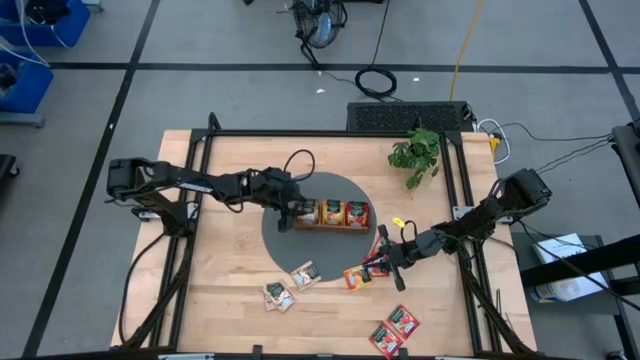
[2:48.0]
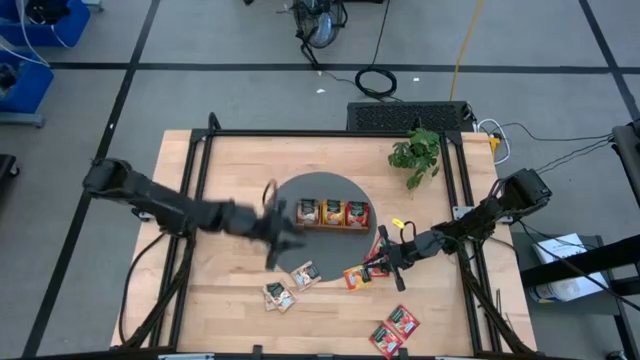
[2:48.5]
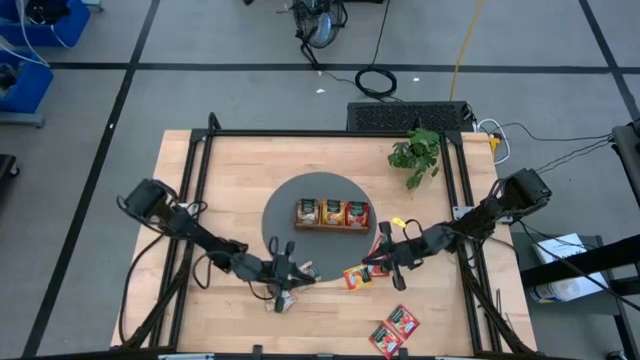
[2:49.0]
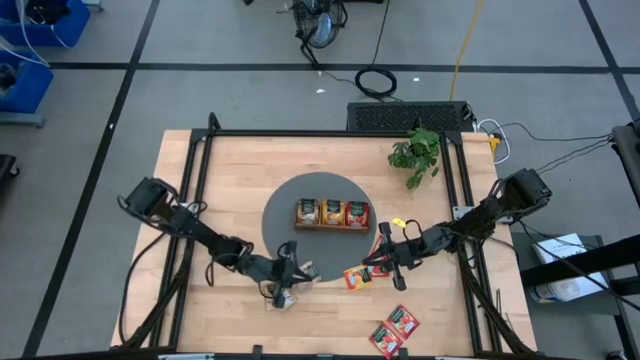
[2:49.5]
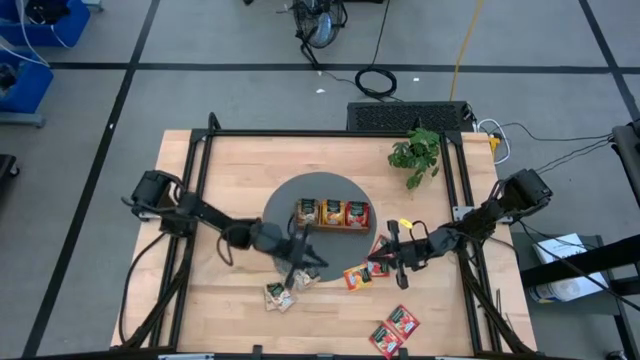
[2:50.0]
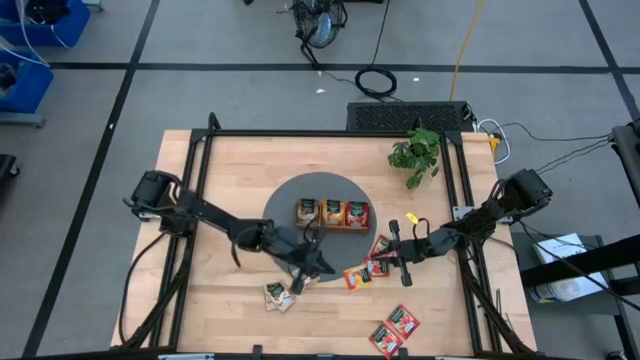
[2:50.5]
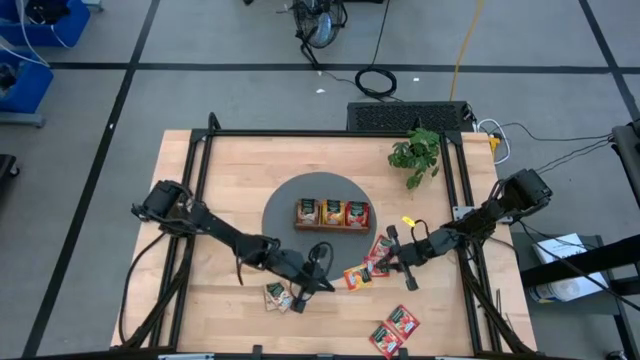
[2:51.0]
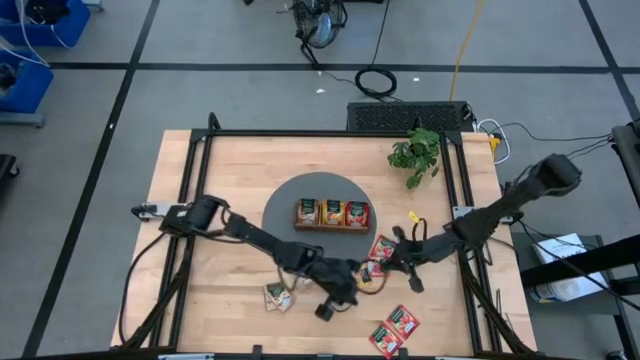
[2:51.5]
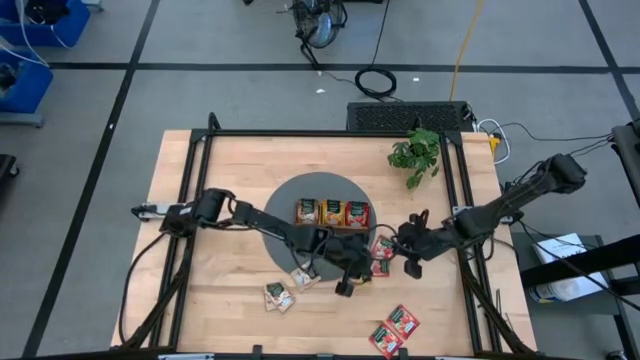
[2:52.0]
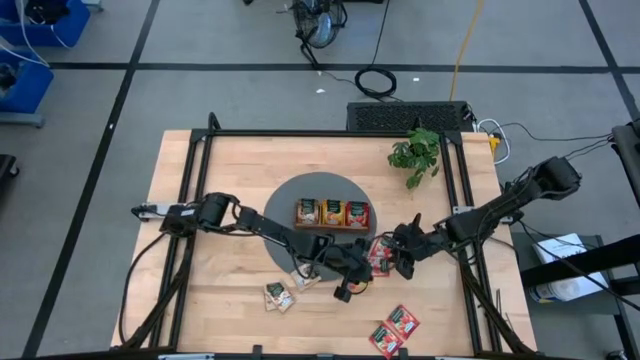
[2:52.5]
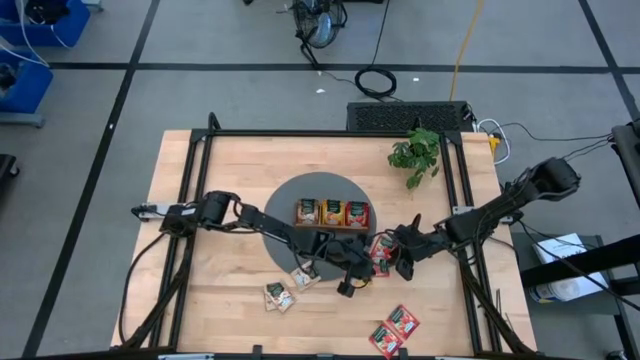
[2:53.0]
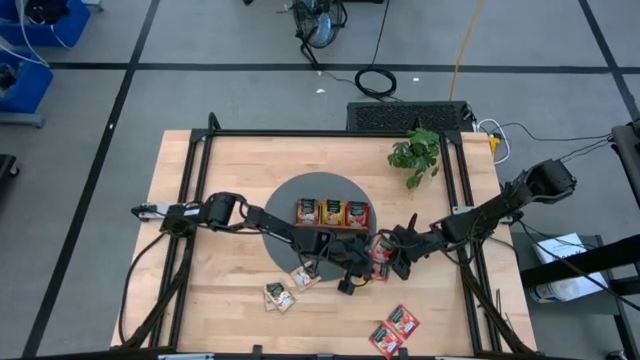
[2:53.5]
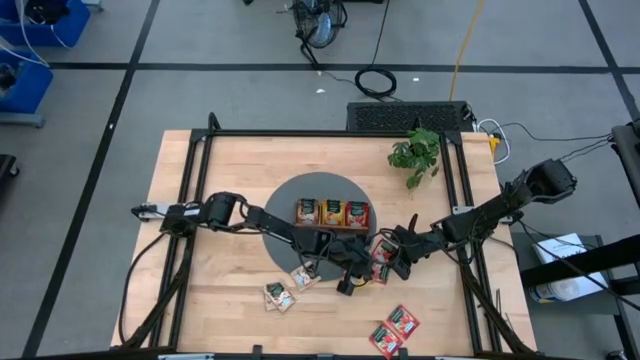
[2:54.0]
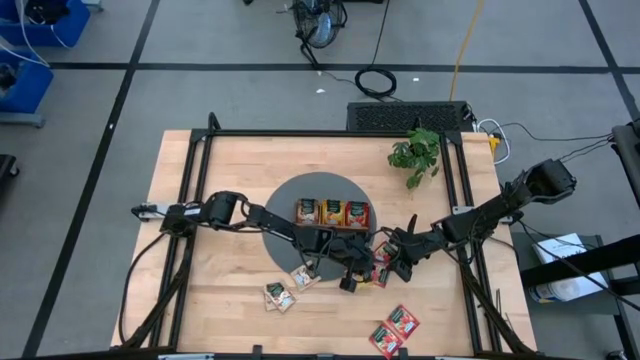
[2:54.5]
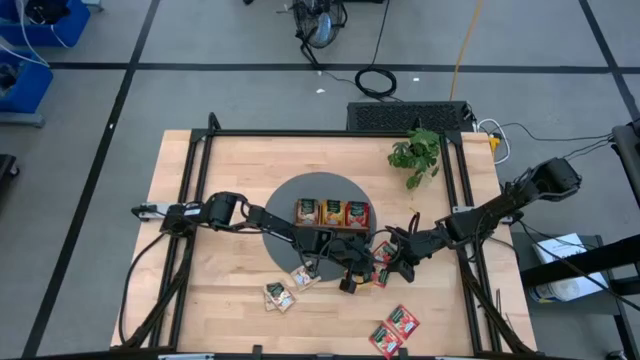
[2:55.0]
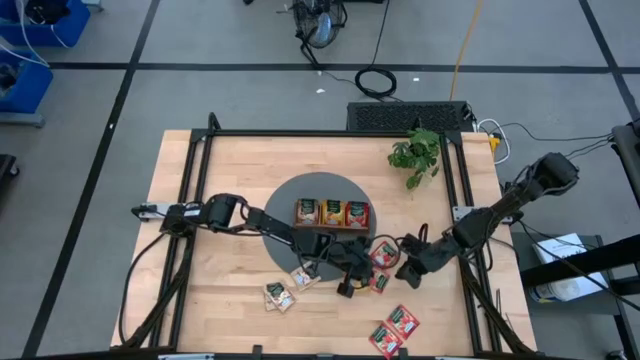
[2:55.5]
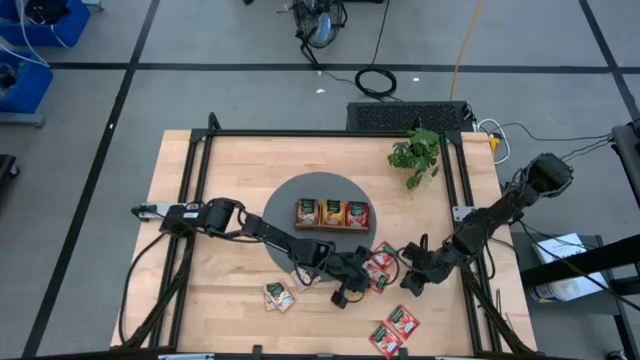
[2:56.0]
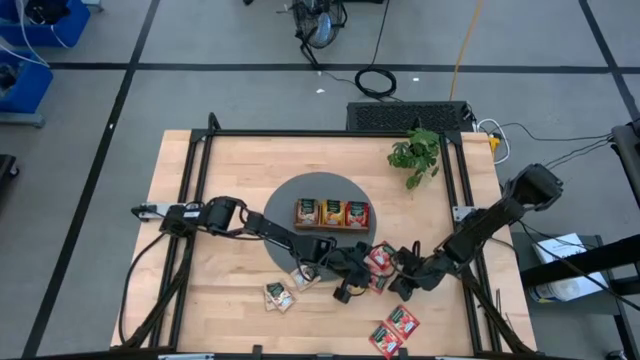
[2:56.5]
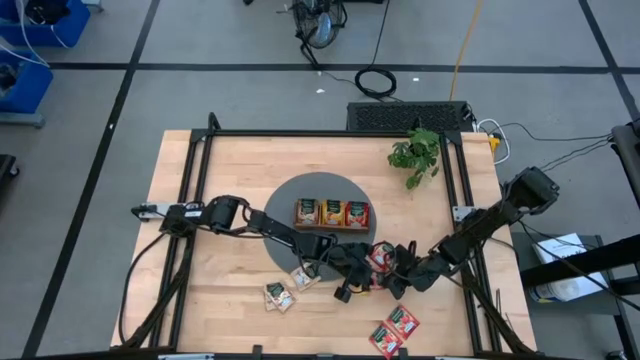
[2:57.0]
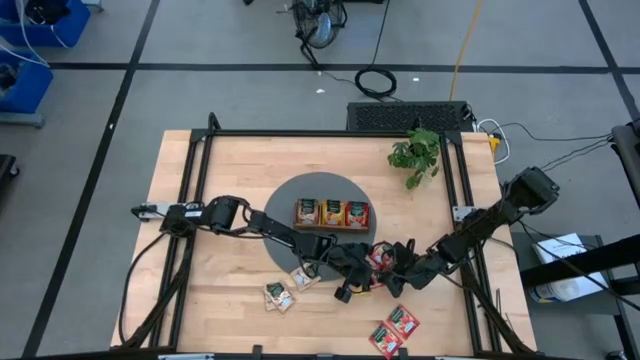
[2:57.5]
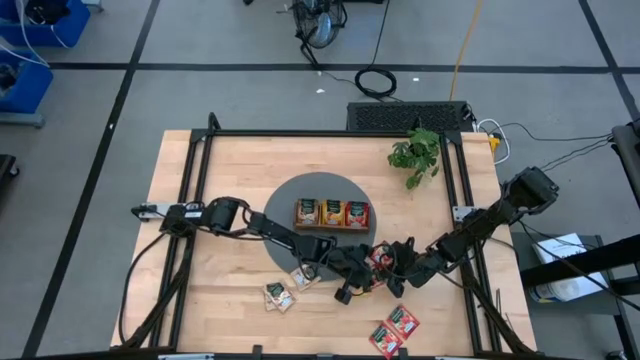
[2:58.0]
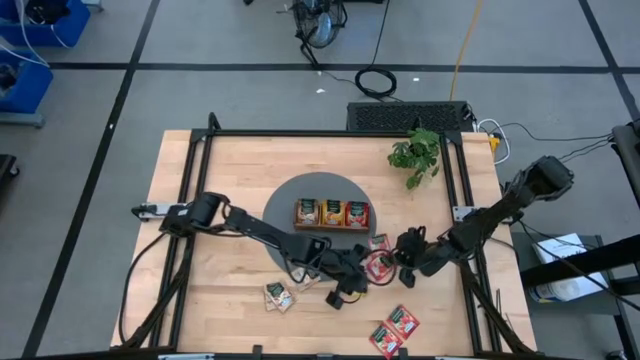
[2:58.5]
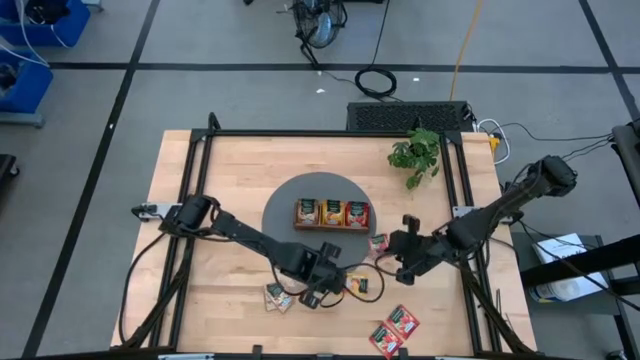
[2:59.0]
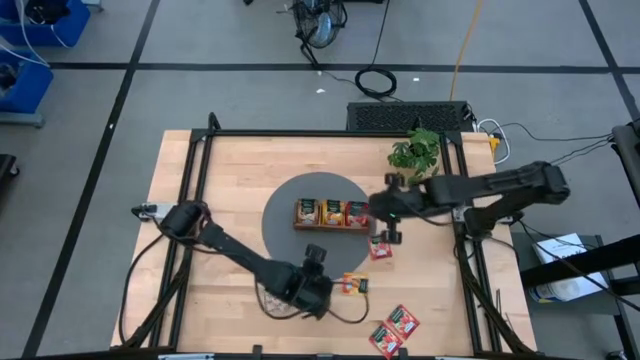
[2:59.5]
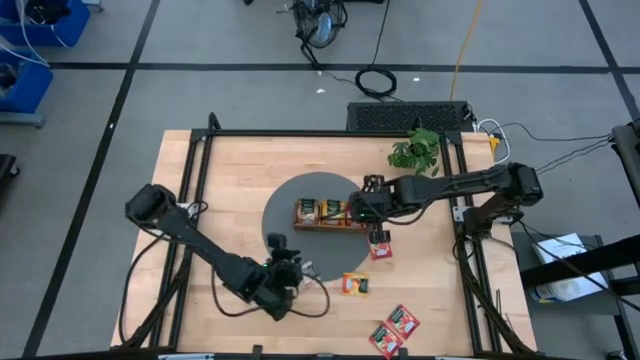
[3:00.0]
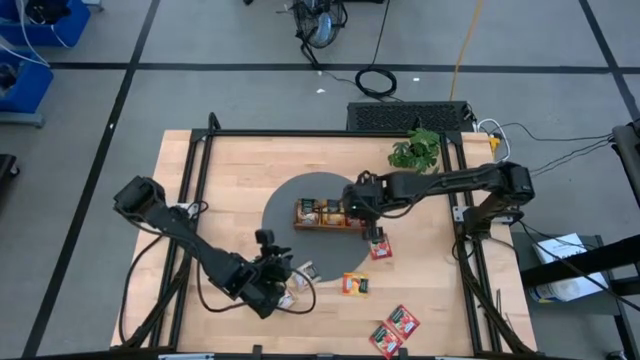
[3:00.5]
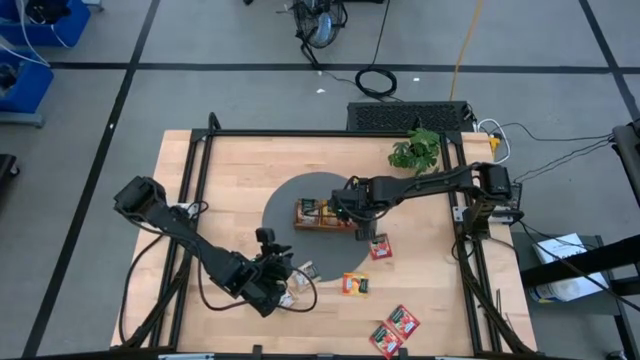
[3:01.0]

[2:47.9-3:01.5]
Task: Pick & Place Tea
Put the red tea sachet into the right section of the wooden organizer

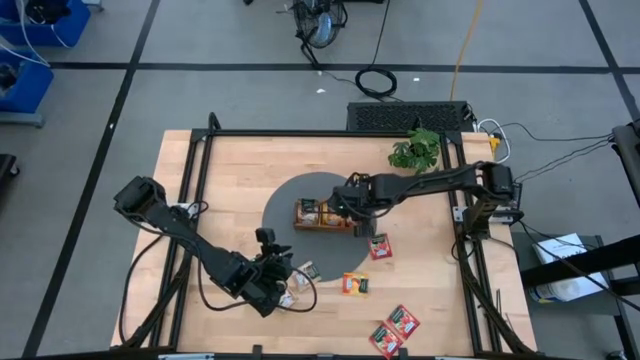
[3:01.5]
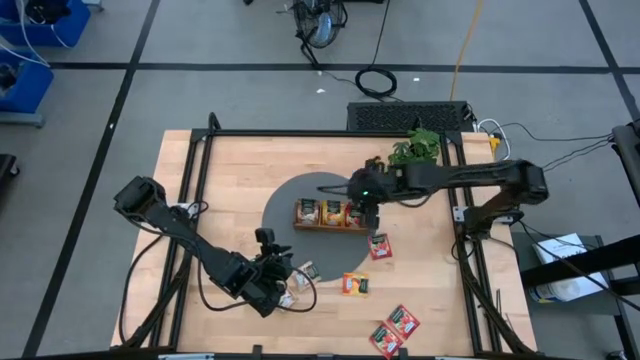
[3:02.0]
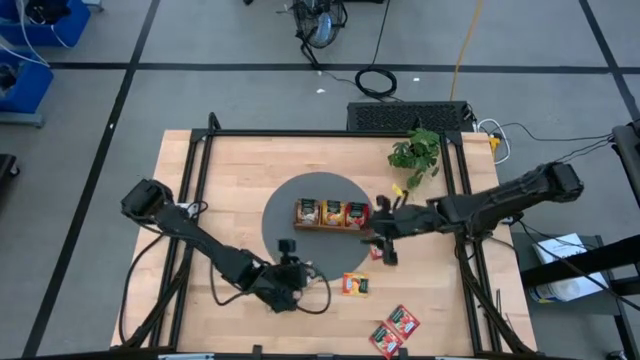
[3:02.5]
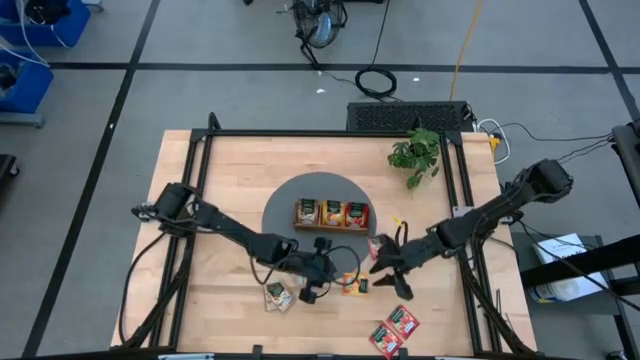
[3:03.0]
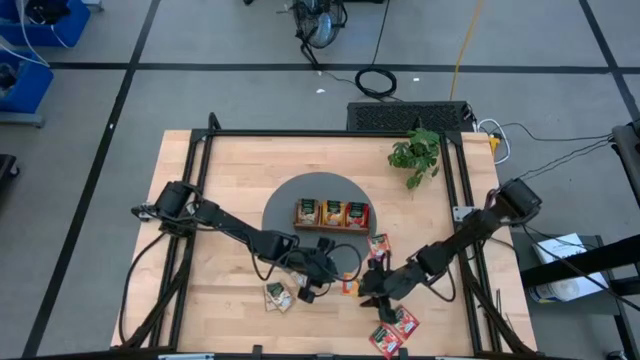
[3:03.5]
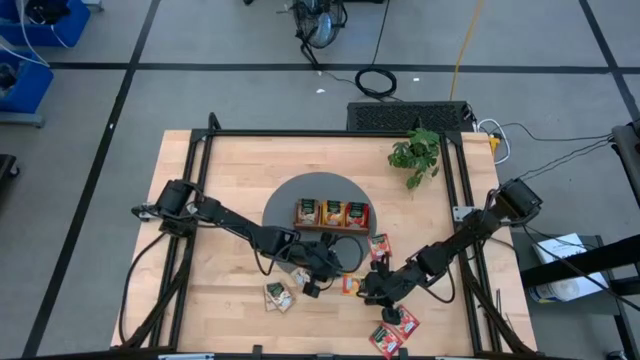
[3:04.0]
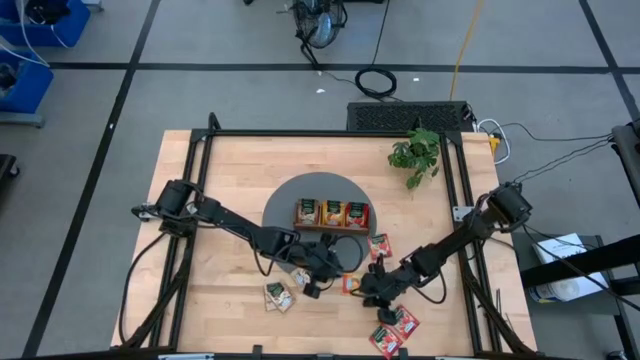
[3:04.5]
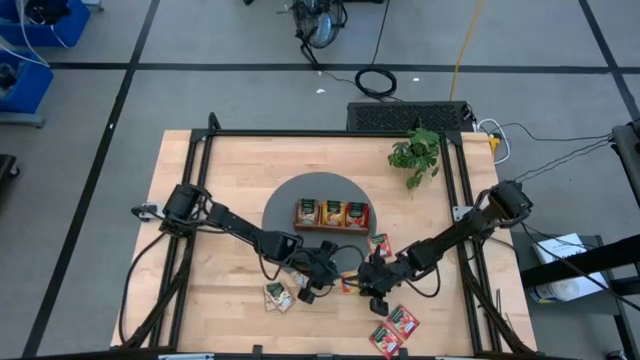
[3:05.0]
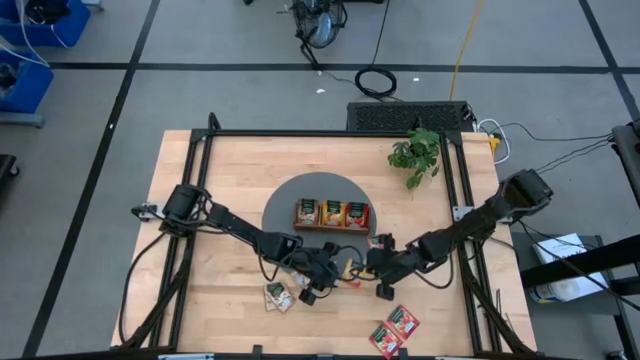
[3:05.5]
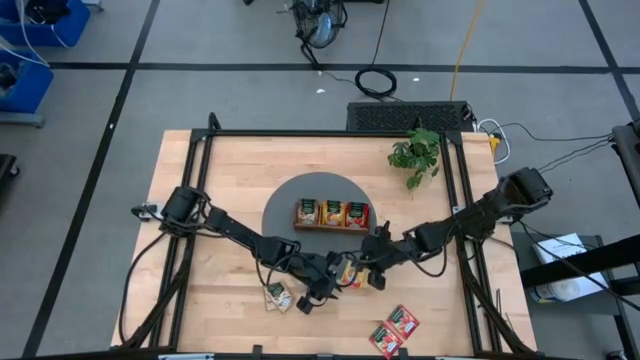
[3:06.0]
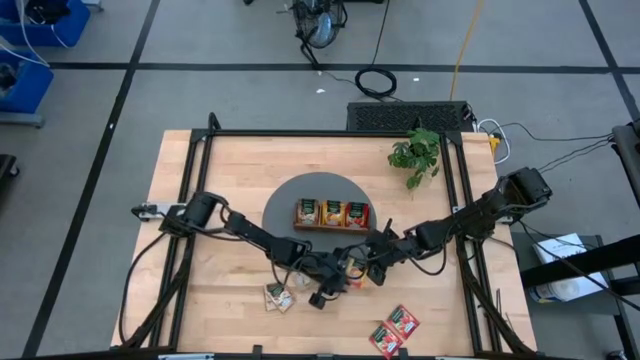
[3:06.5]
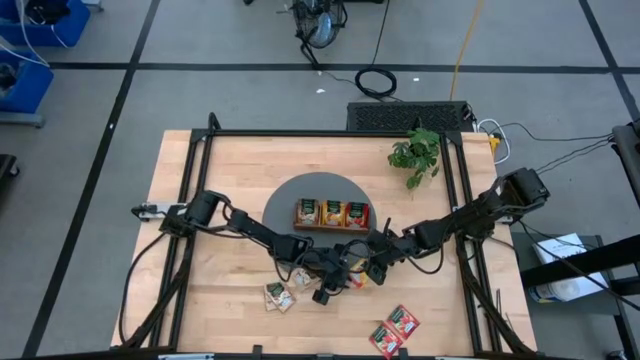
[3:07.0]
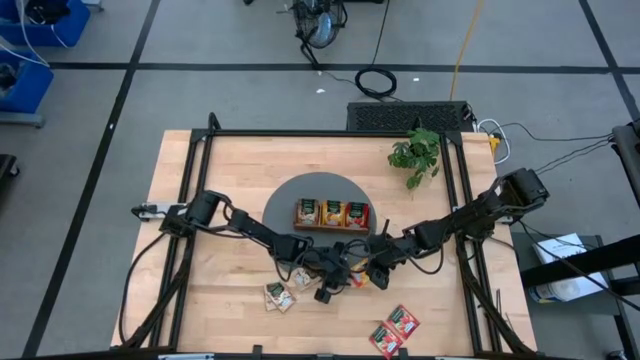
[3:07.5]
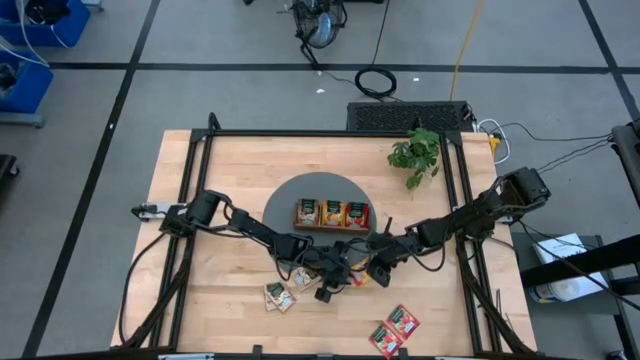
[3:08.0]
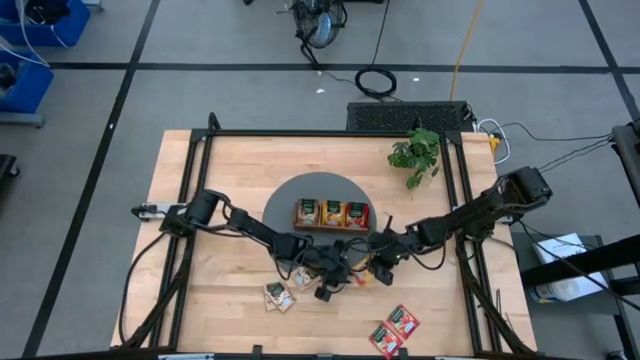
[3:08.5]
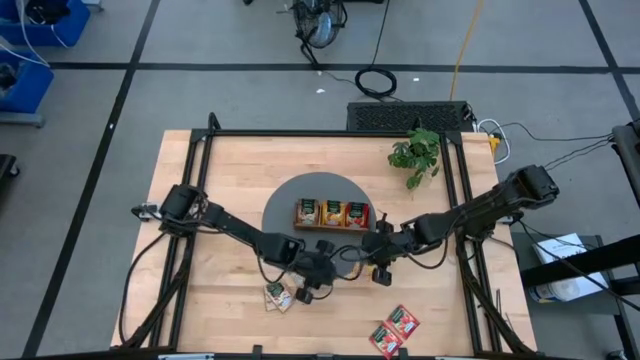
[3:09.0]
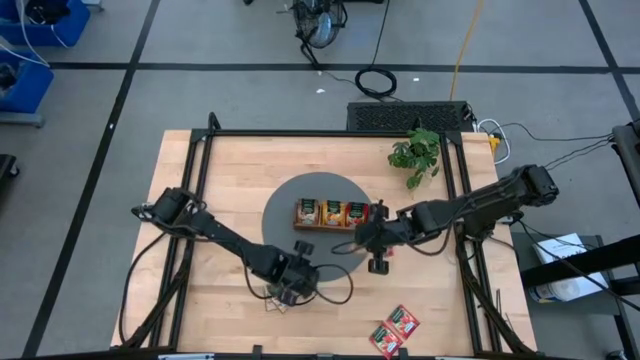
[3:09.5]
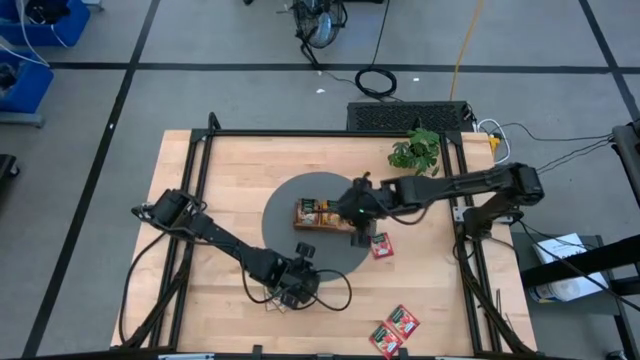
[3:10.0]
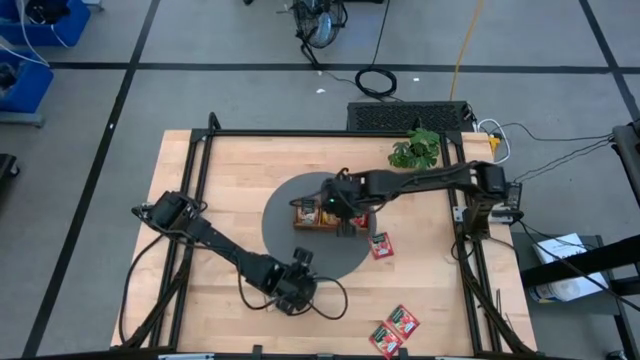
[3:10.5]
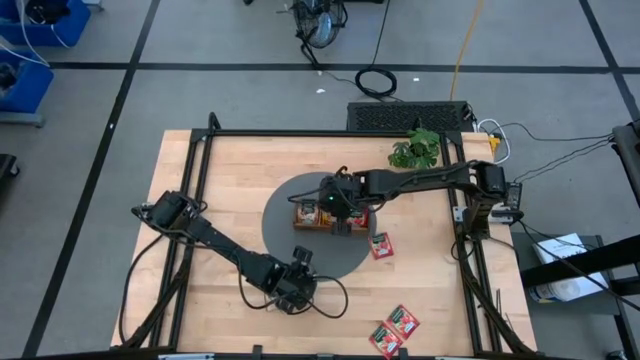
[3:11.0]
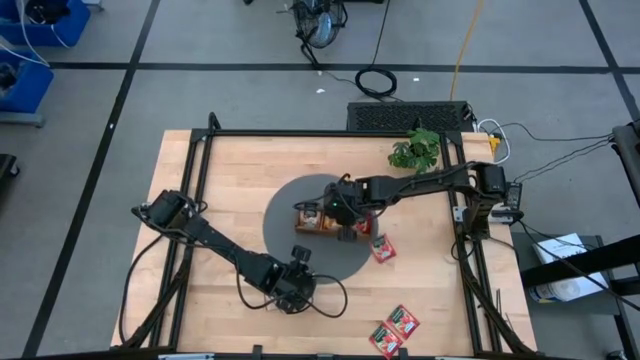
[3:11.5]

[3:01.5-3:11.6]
Put the yellow tea sachet into the middle section of the wooden organizer
